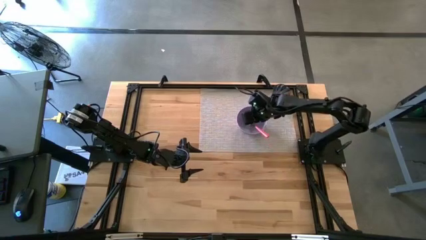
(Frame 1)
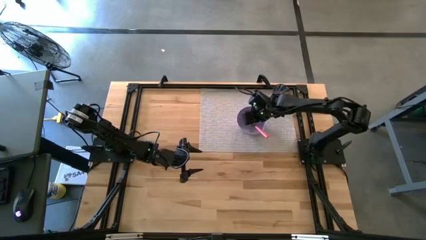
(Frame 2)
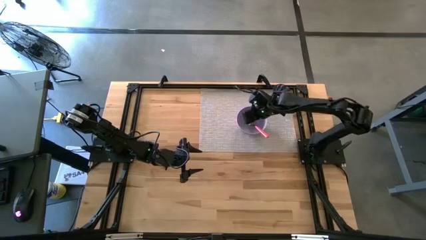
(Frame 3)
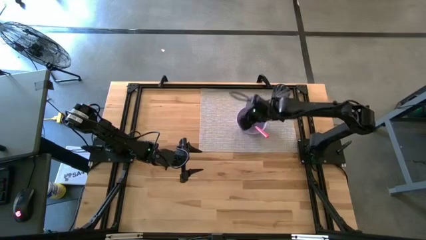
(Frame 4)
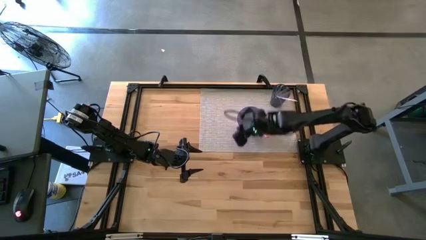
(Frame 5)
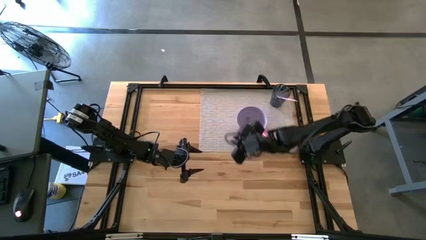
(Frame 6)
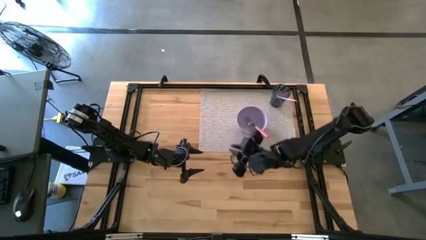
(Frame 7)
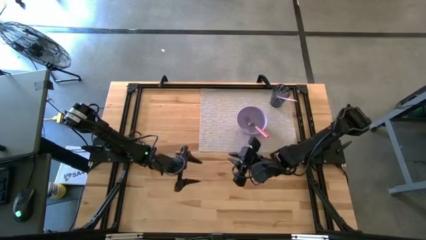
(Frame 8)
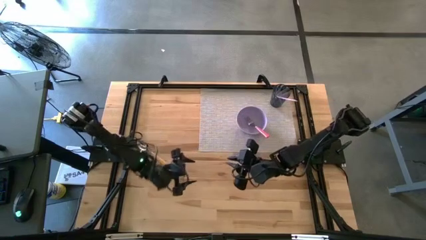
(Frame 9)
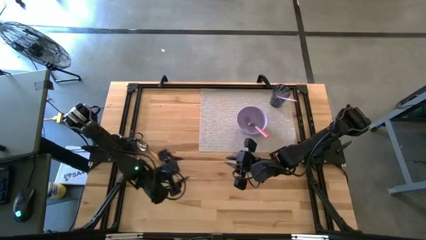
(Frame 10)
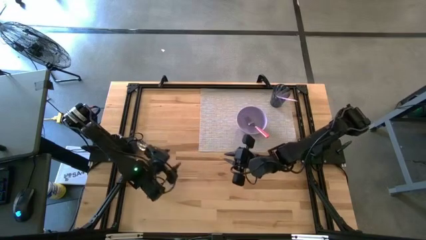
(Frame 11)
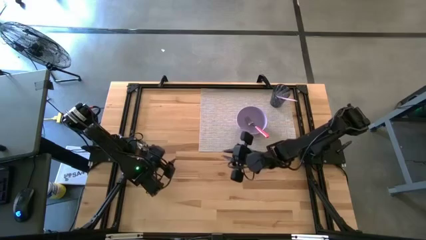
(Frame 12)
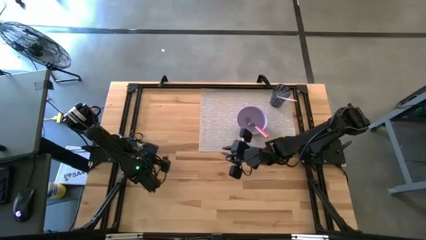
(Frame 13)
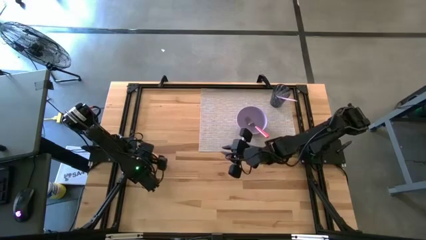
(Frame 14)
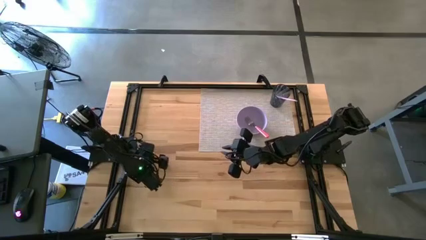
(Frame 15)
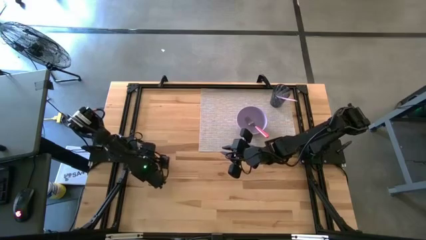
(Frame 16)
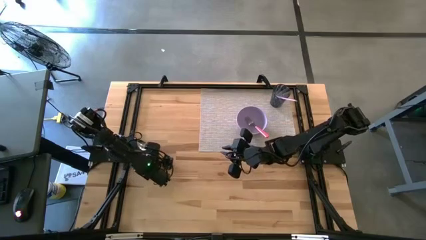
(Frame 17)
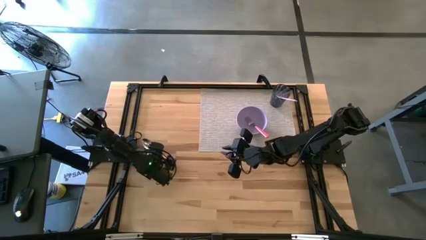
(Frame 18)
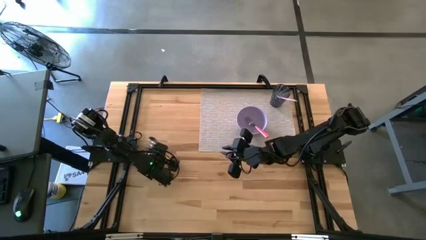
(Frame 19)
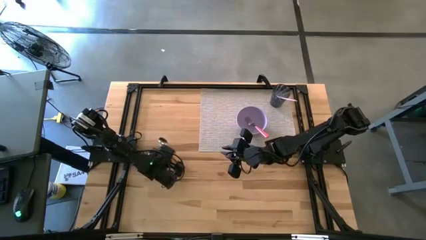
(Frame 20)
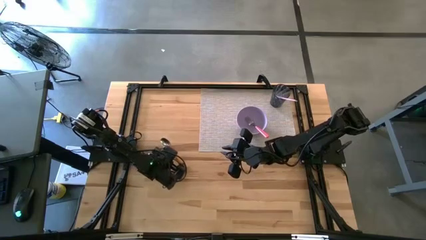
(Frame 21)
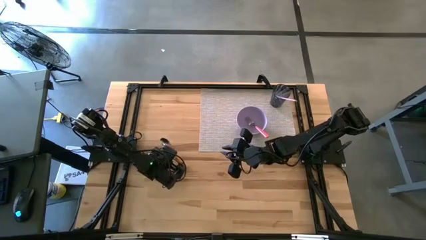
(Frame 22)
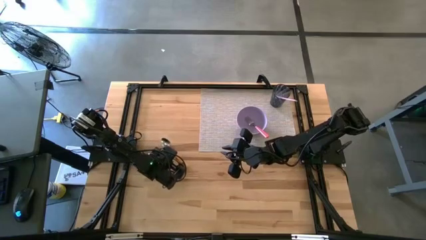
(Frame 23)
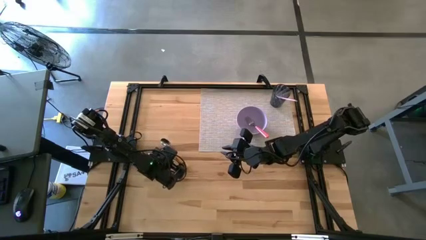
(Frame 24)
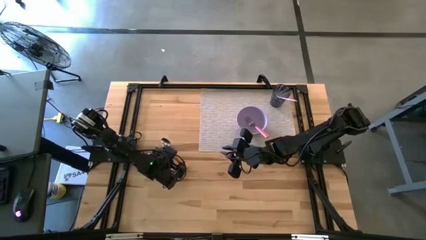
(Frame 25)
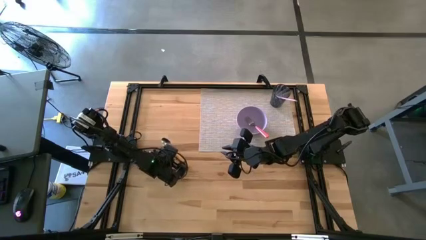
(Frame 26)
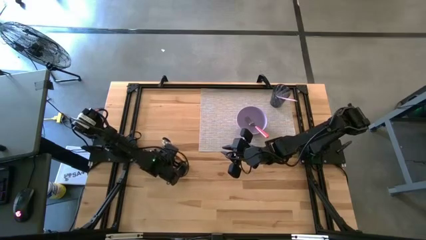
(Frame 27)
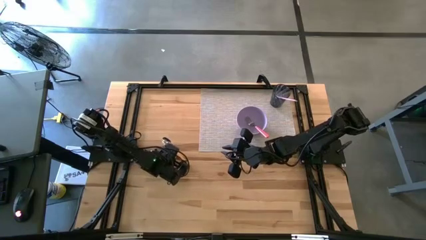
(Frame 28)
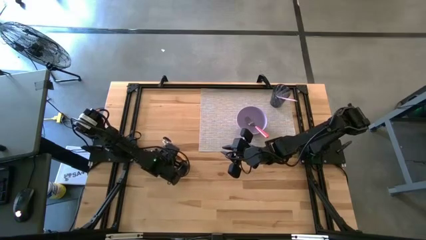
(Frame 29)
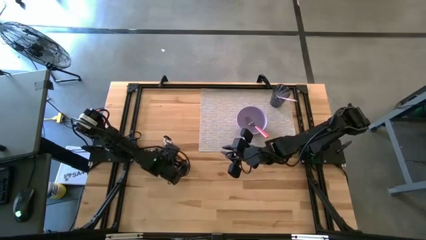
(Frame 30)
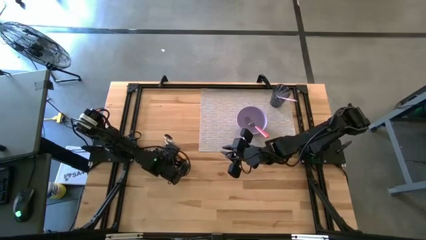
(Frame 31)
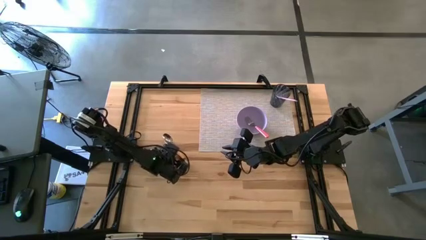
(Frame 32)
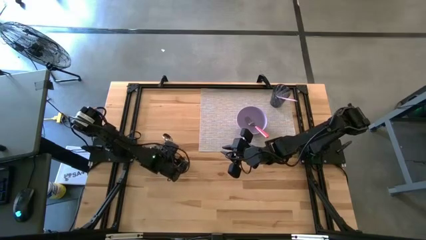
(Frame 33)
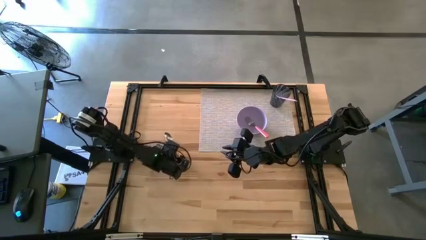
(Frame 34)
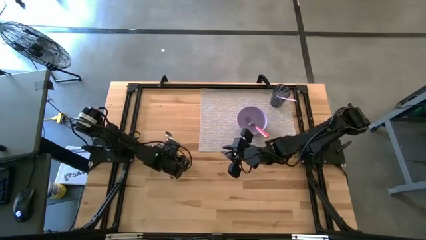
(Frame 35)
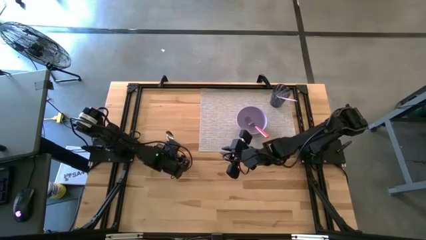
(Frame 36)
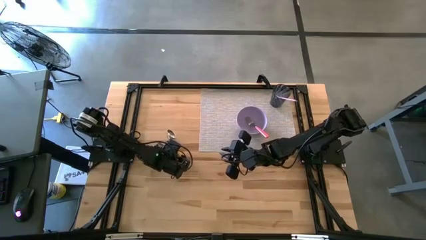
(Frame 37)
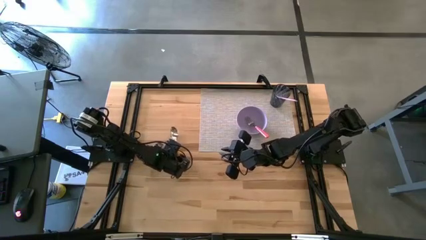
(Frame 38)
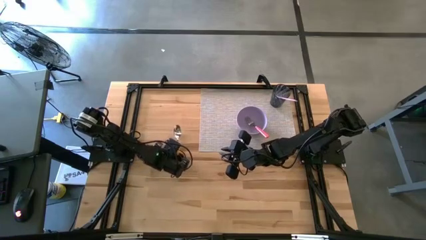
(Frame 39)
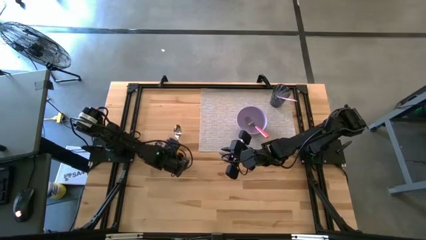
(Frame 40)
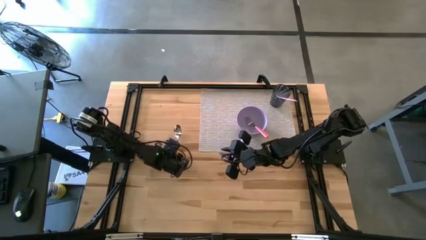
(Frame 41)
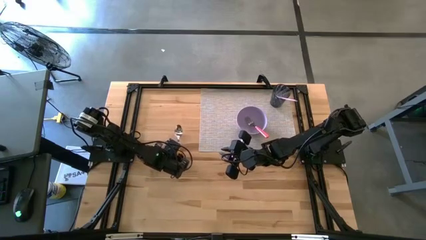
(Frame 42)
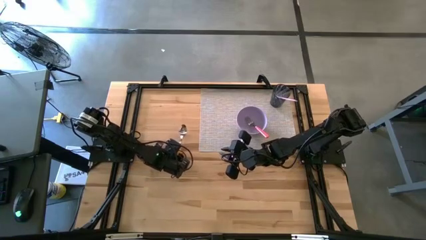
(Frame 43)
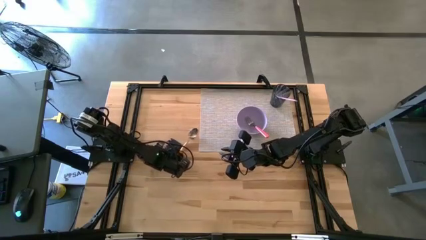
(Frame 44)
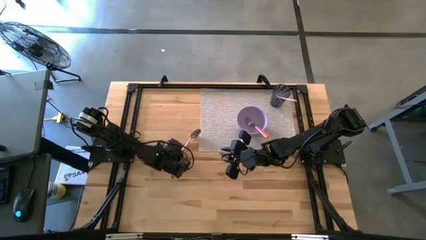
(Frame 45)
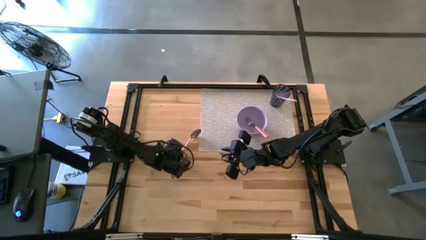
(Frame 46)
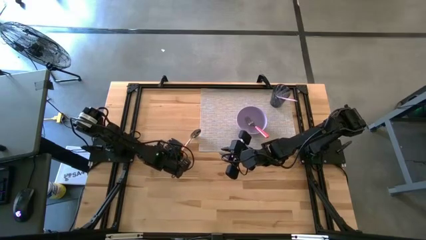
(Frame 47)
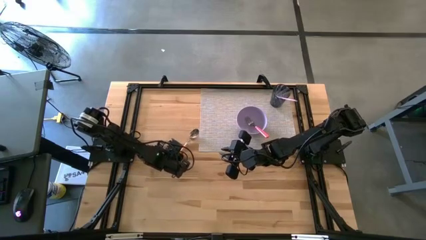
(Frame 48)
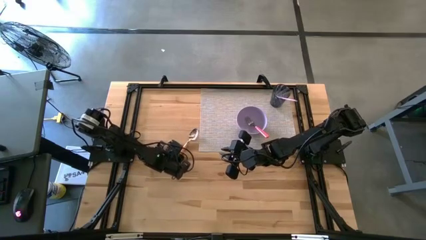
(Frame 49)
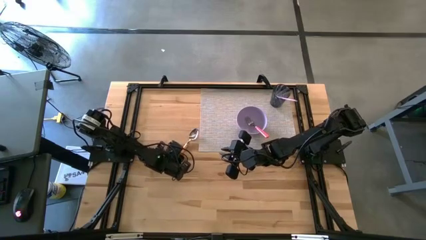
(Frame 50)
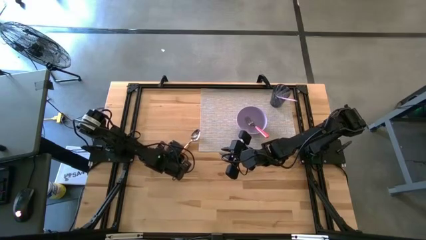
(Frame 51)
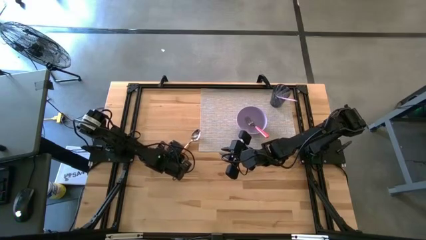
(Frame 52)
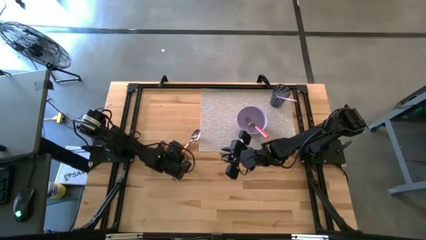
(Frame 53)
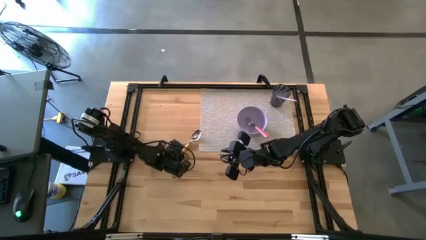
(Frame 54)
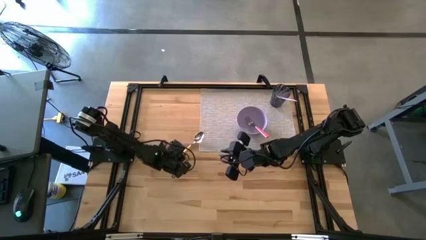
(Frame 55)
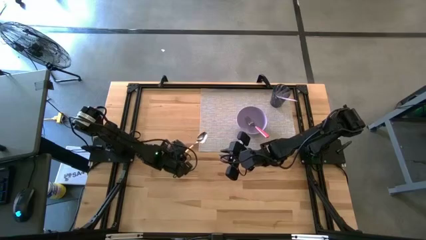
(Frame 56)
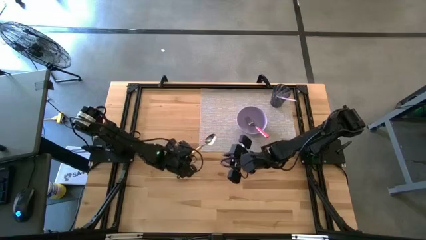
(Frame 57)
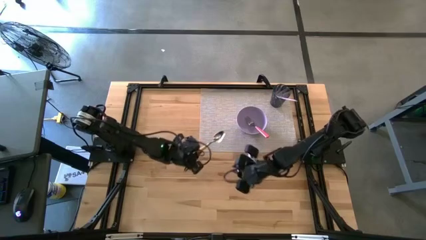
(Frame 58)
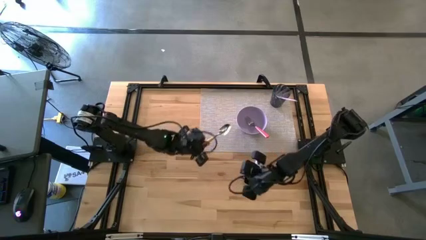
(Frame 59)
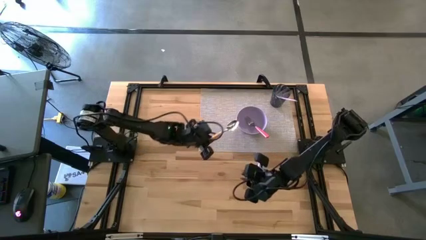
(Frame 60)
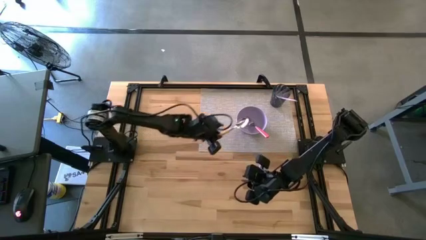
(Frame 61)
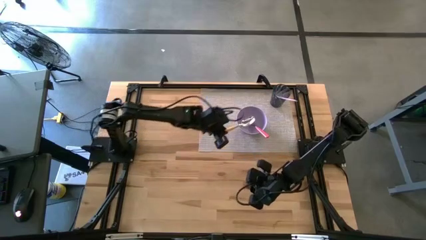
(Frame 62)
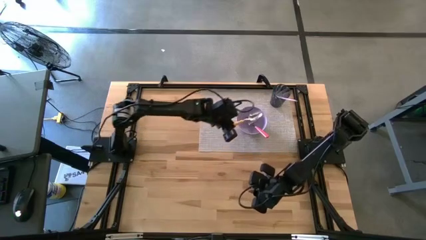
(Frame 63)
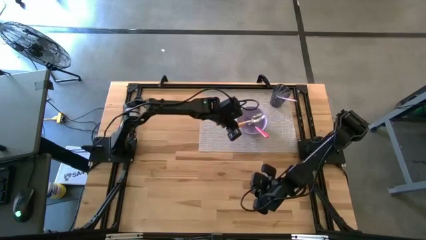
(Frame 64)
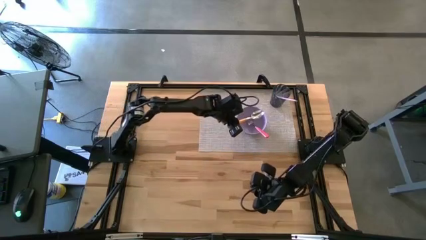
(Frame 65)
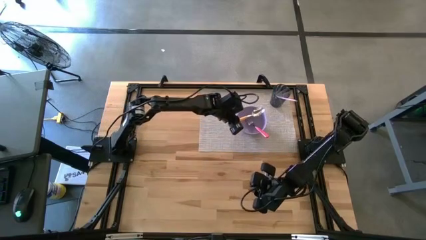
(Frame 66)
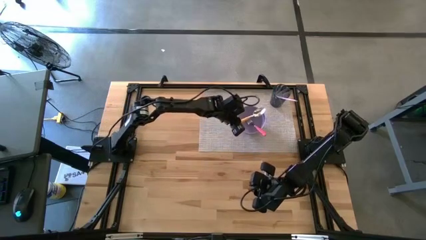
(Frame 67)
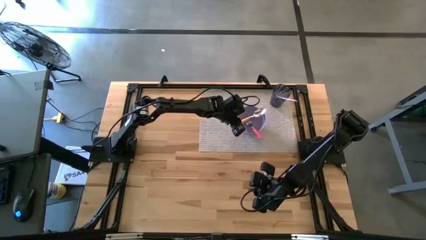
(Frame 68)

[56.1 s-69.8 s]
Task: Pick & Place Utensil
Put the yellow spoon into the purple bowl
